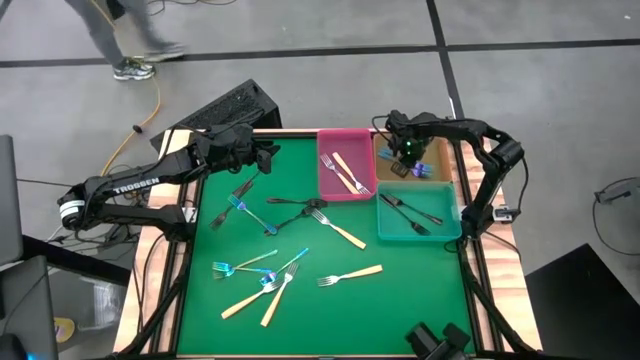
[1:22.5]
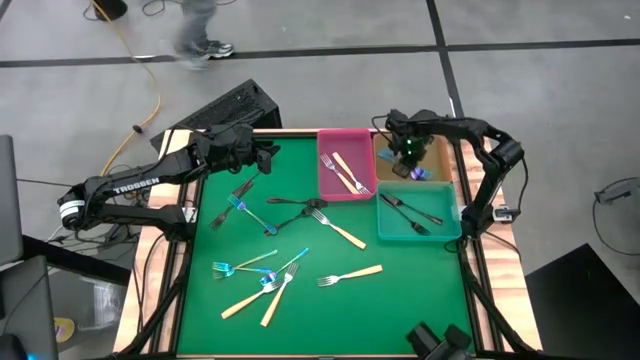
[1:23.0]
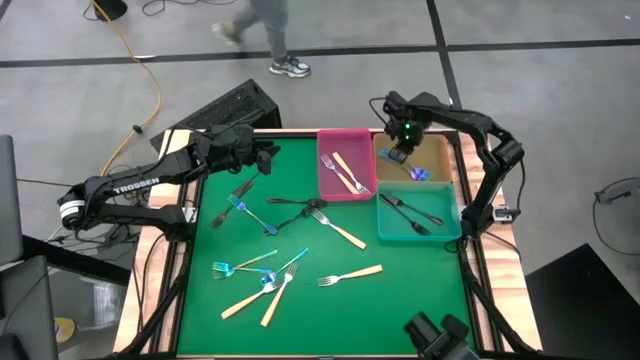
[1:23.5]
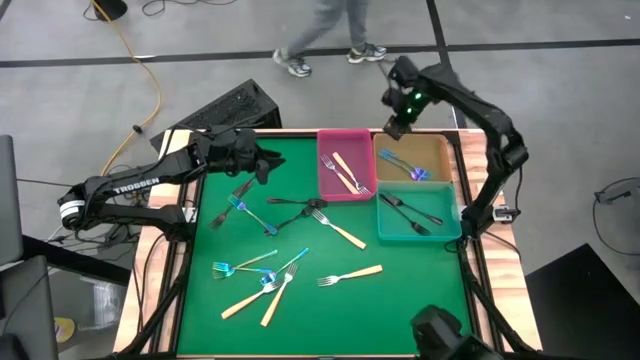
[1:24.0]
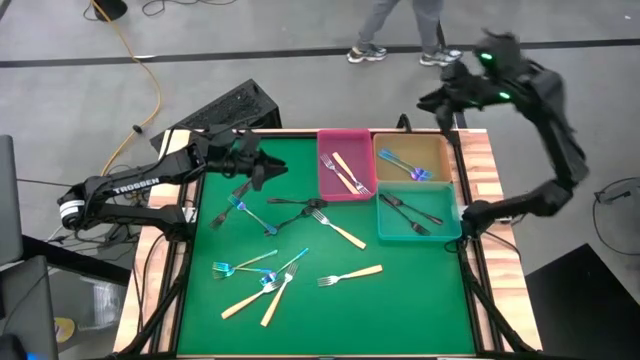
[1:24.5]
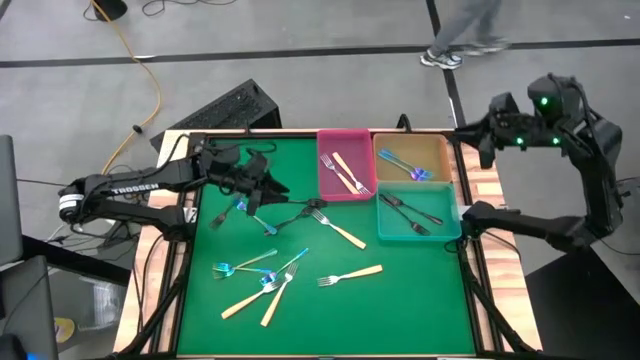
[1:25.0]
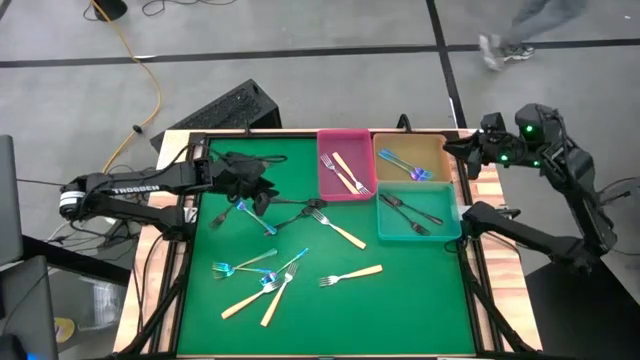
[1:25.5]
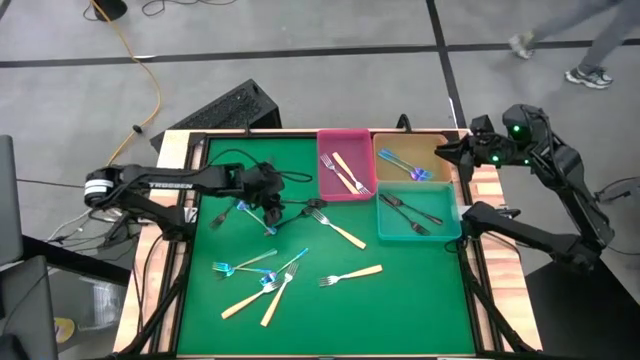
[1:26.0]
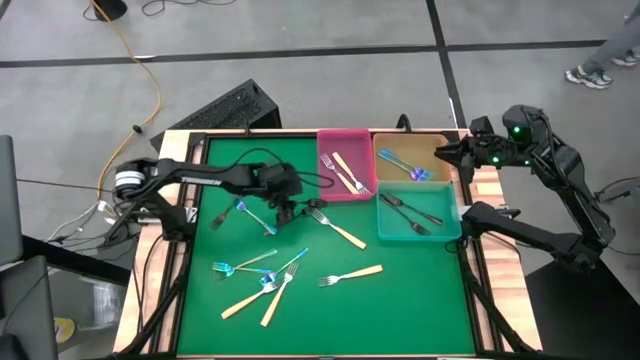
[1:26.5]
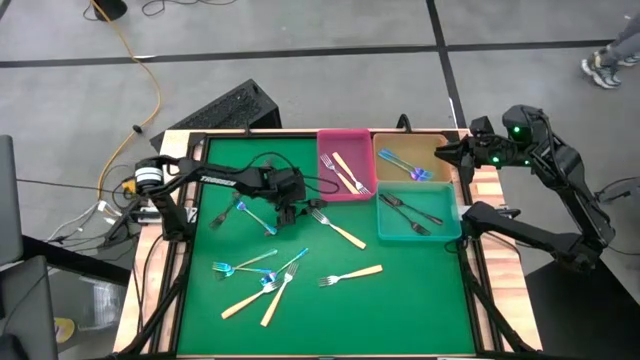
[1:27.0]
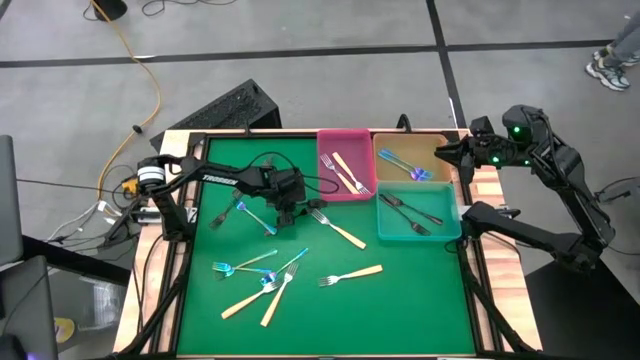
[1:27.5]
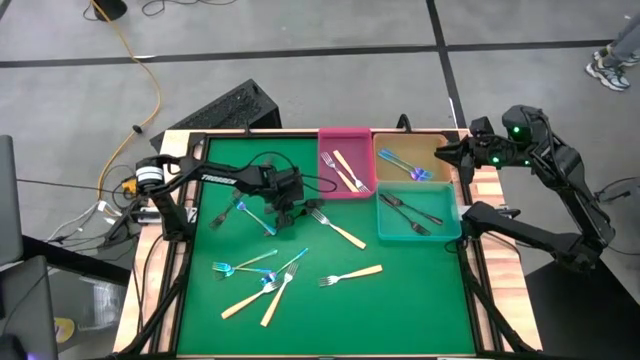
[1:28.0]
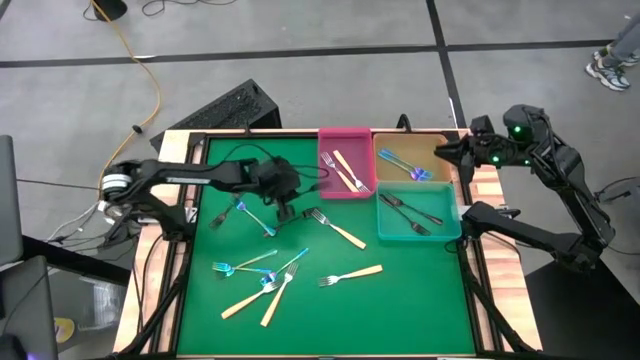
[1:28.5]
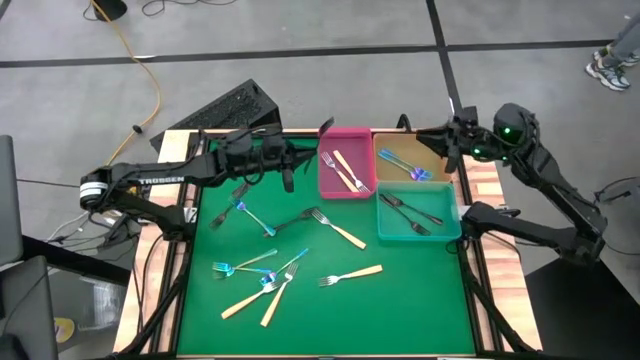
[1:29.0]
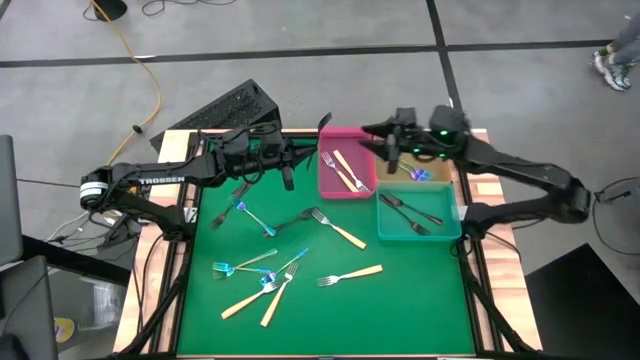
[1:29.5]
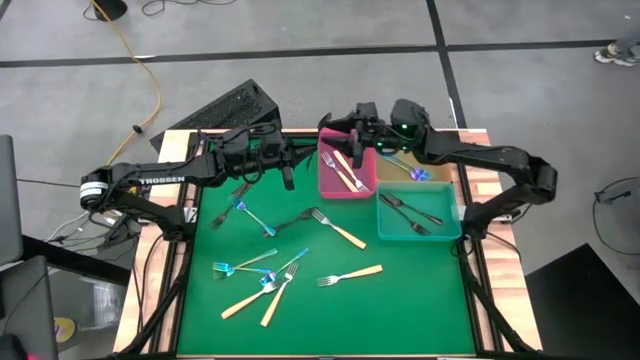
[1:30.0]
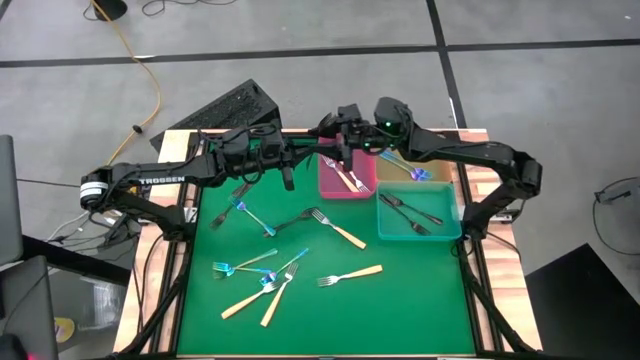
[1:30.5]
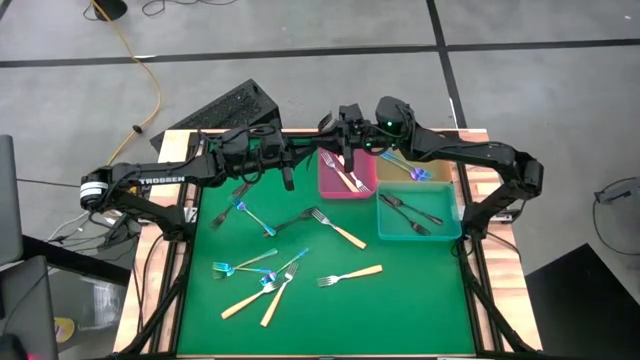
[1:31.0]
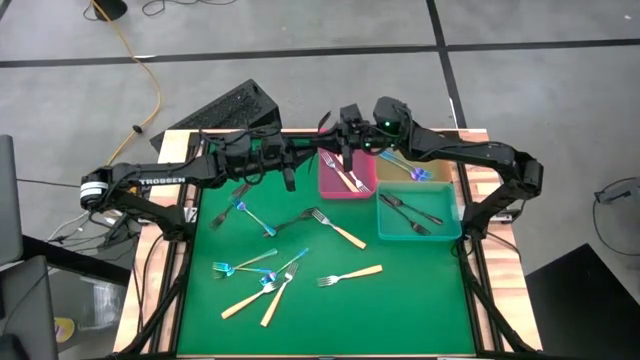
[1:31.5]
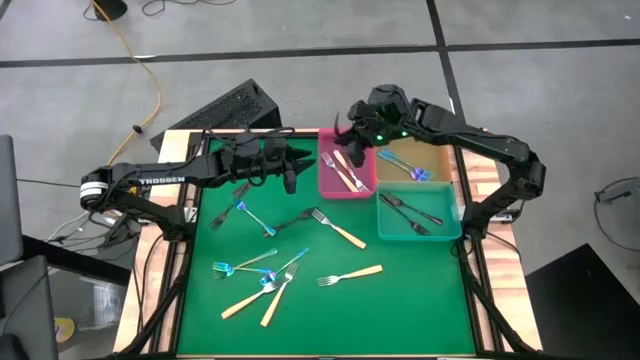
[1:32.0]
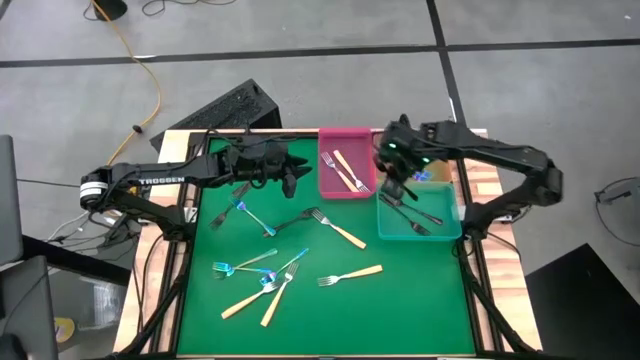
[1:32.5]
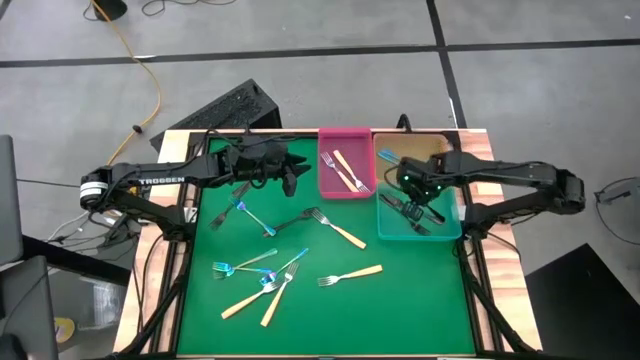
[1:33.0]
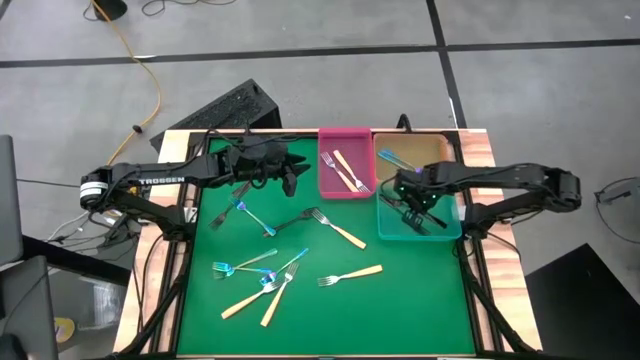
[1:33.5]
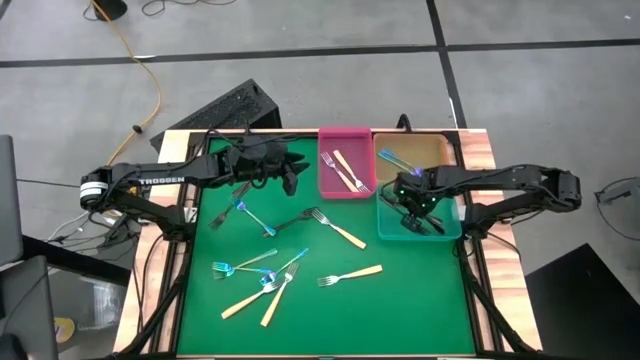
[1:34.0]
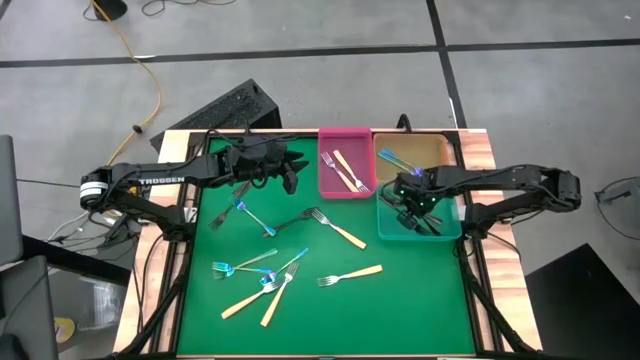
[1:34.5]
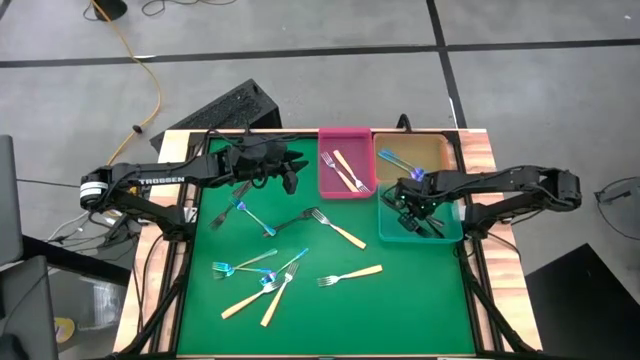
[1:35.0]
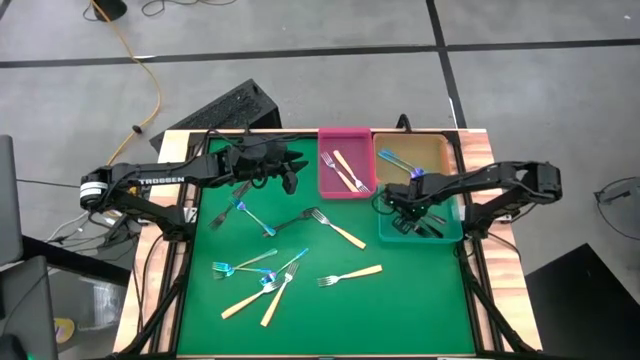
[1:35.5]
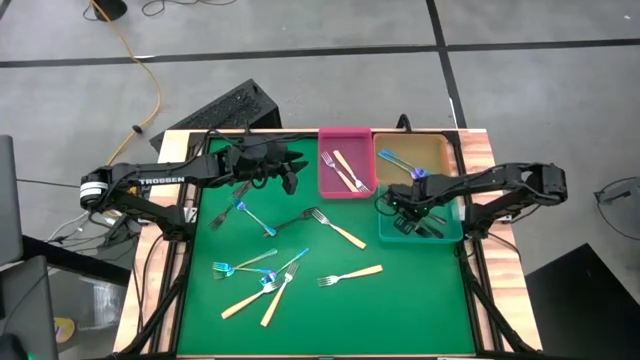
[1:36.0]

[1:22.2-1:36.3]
Task: Sort silverware by color (type)
Put the black fork into the blue bin

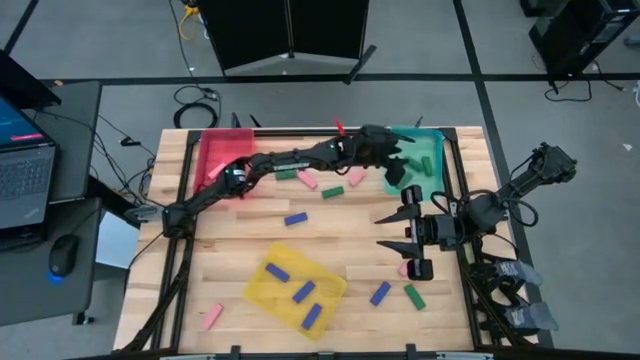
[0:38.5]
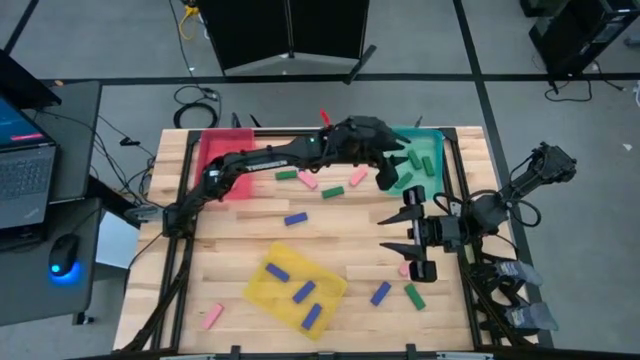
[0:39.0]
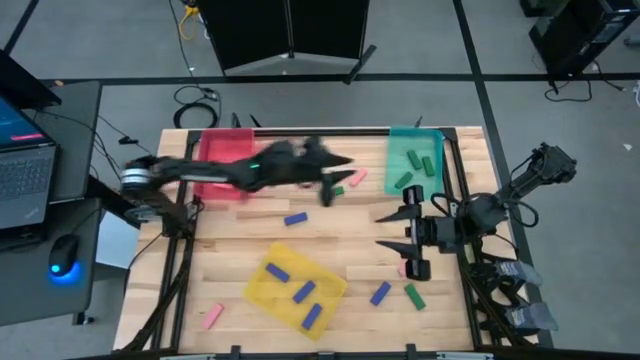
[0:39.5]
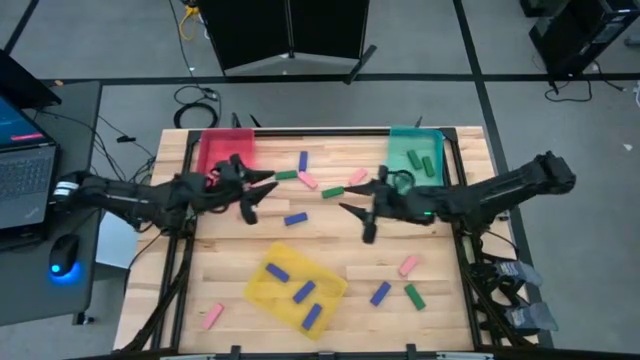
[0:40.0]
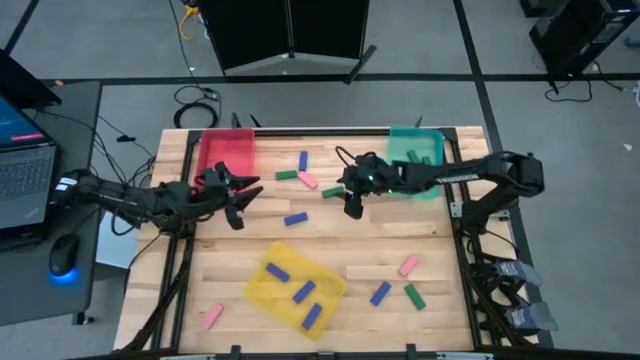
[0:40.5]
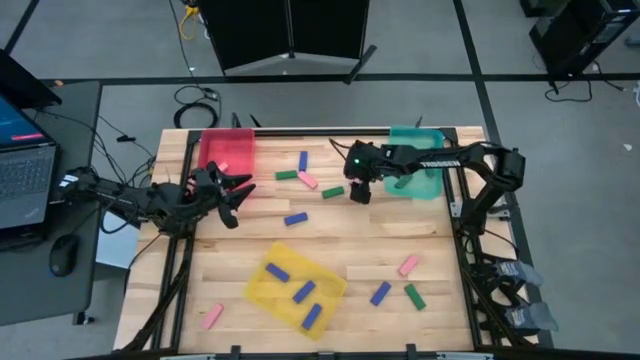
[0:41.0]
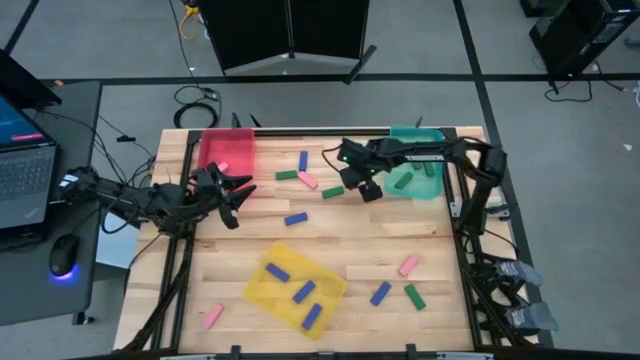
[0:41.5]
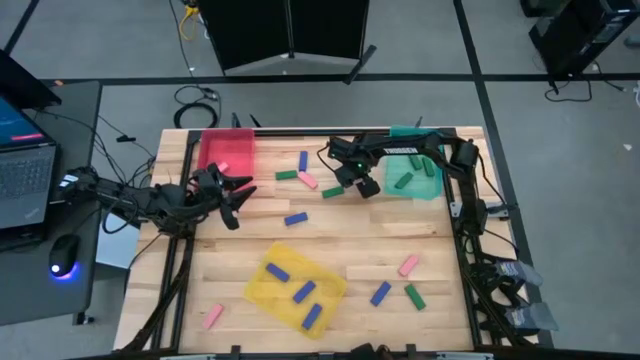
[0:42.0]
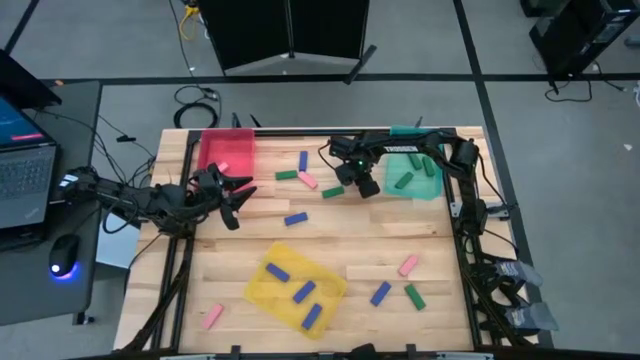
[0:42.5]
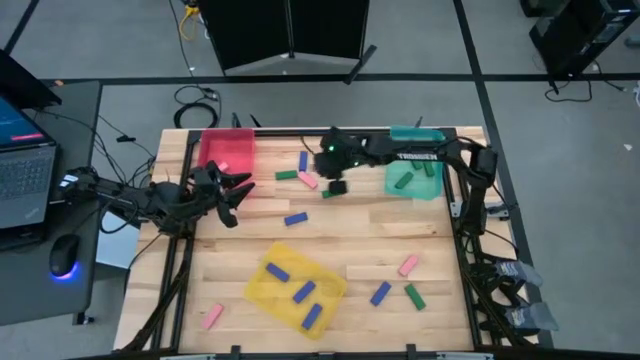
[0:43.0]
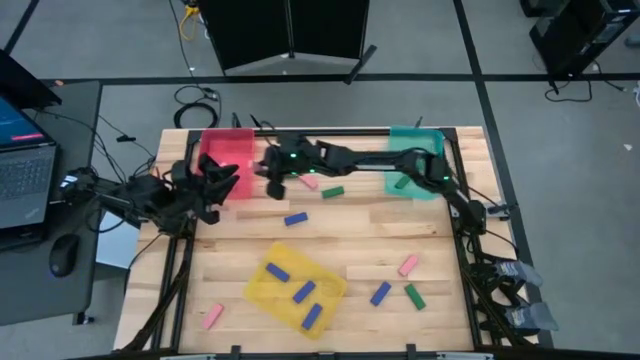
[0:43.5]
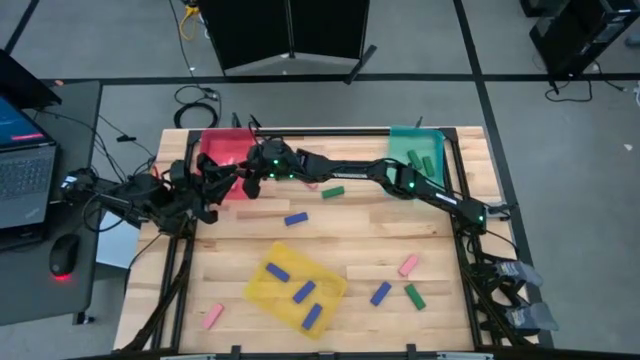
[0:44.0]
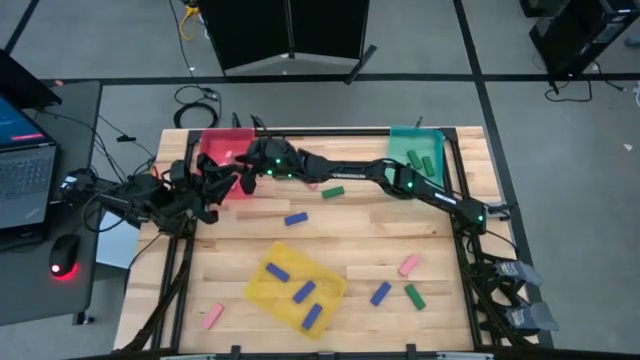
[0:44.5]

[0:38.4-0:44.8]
Task: Sort blocks
Put the pink block into the red bin
